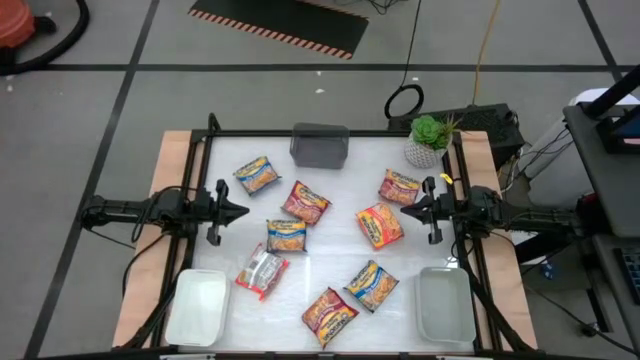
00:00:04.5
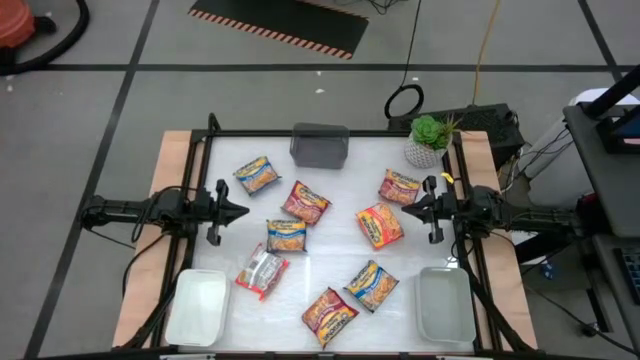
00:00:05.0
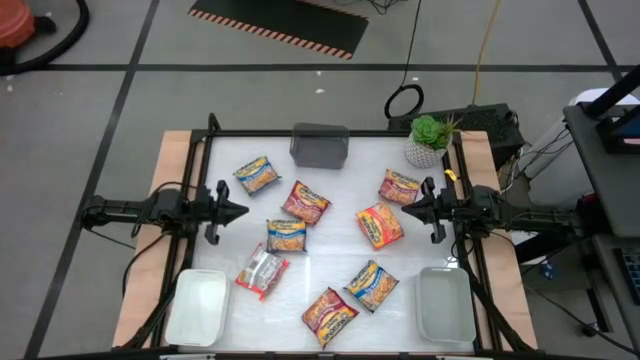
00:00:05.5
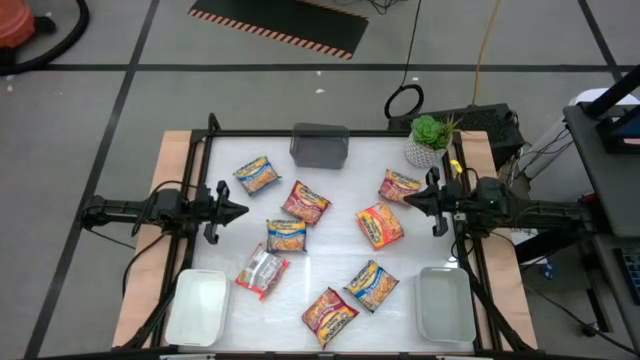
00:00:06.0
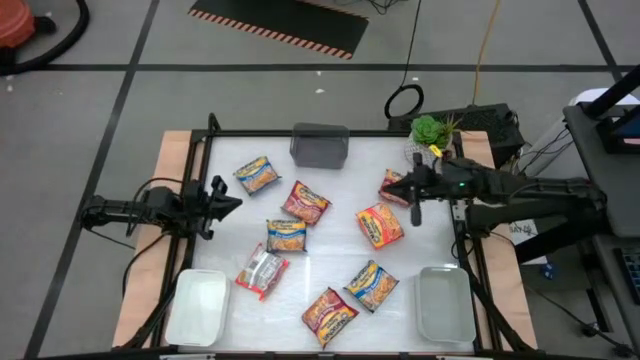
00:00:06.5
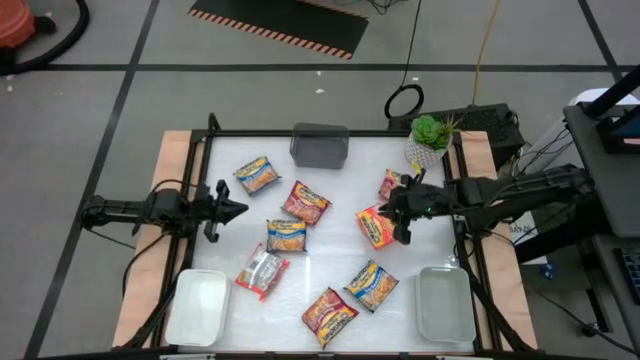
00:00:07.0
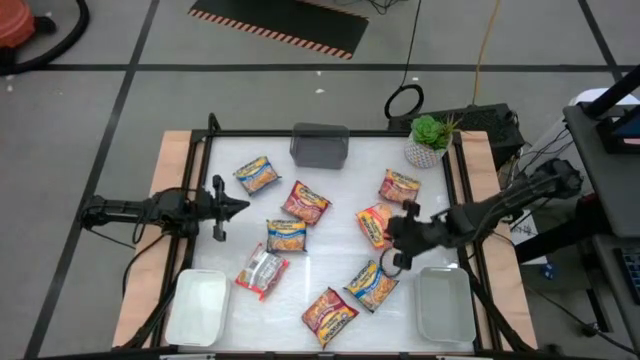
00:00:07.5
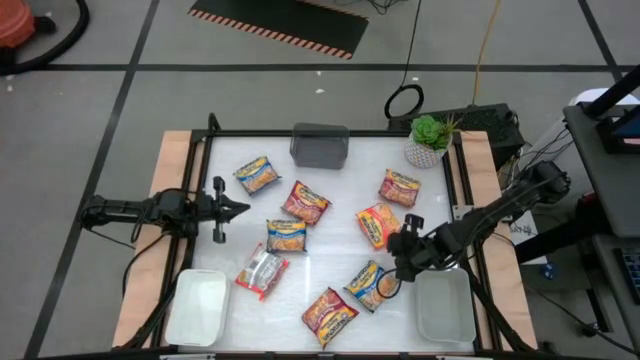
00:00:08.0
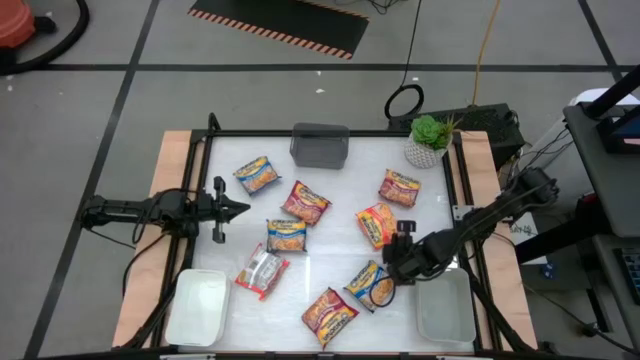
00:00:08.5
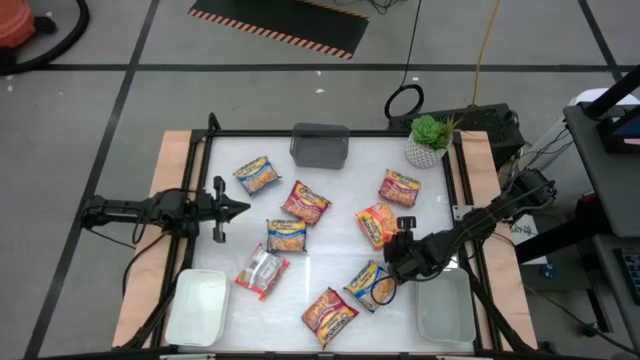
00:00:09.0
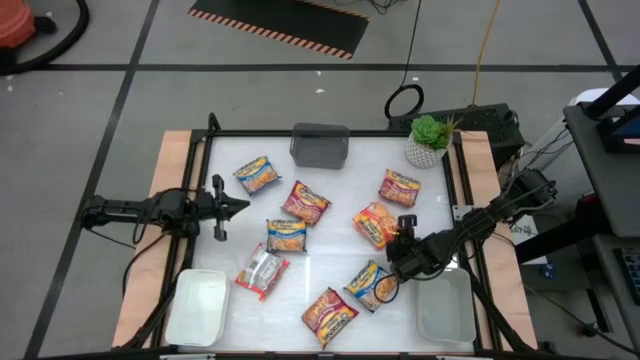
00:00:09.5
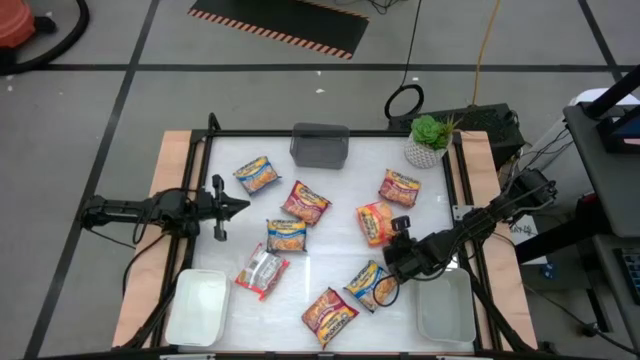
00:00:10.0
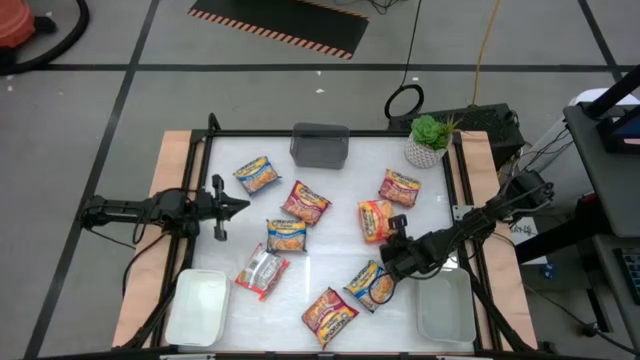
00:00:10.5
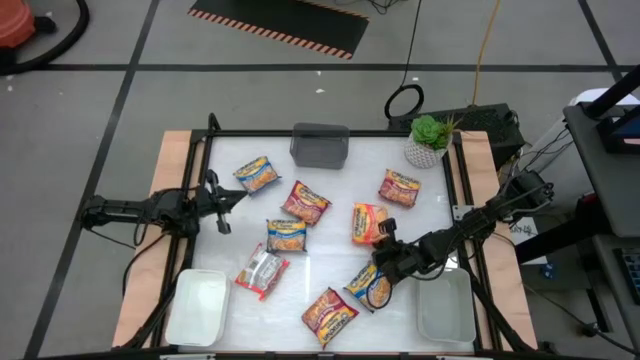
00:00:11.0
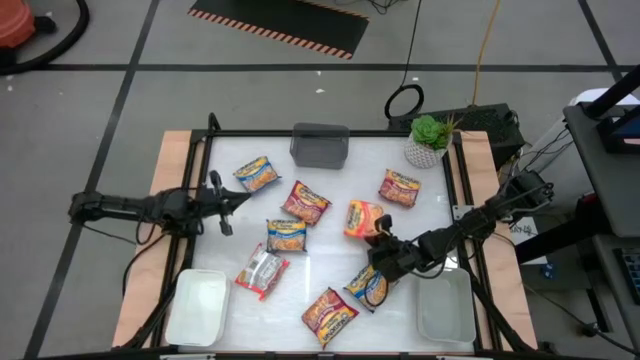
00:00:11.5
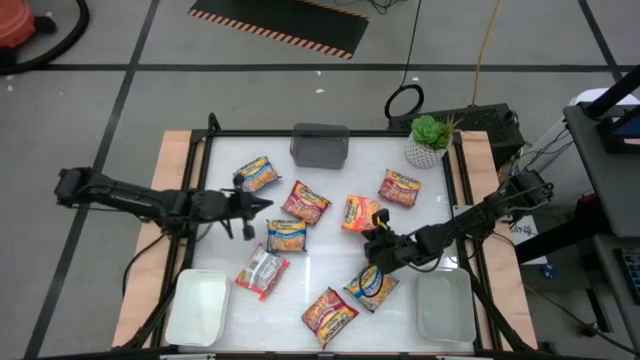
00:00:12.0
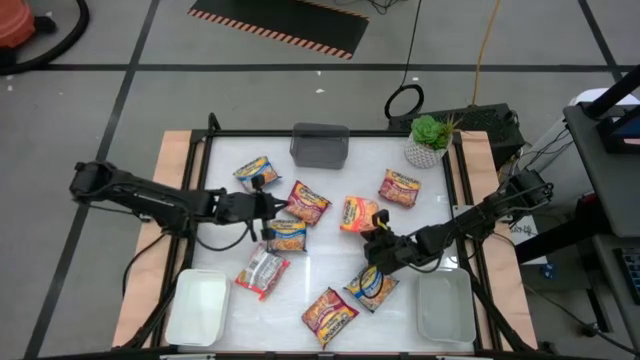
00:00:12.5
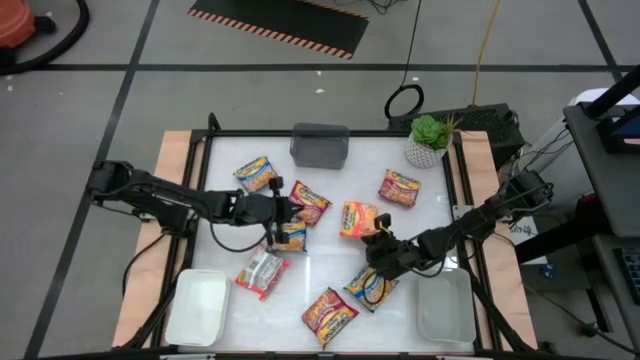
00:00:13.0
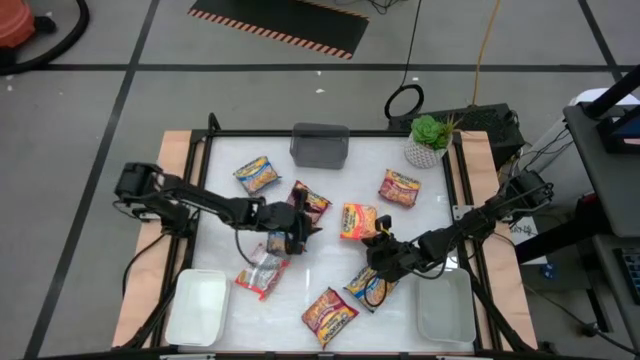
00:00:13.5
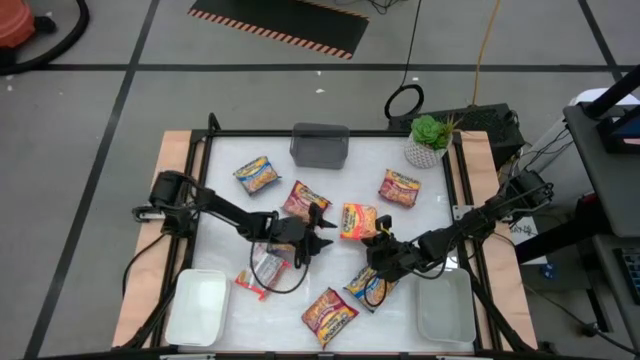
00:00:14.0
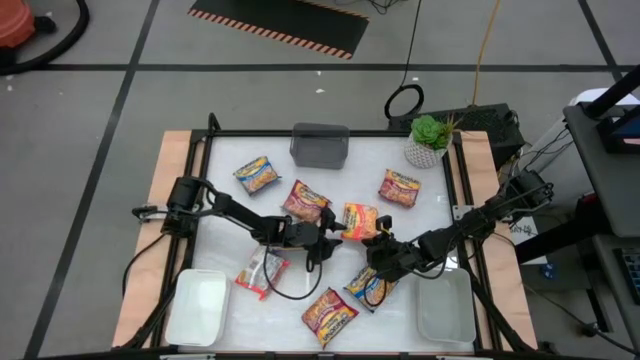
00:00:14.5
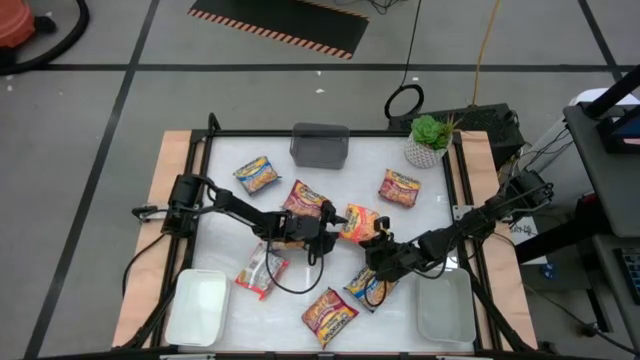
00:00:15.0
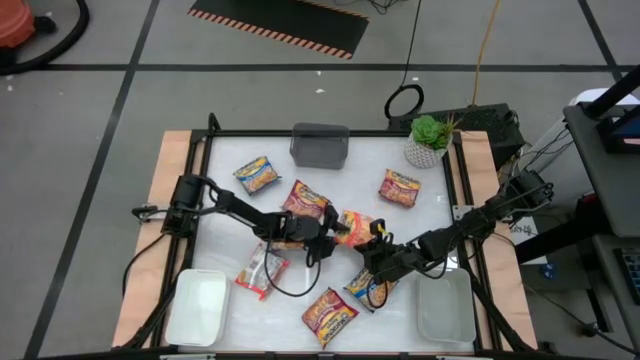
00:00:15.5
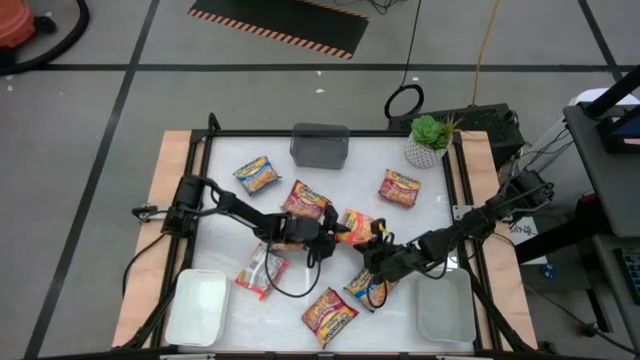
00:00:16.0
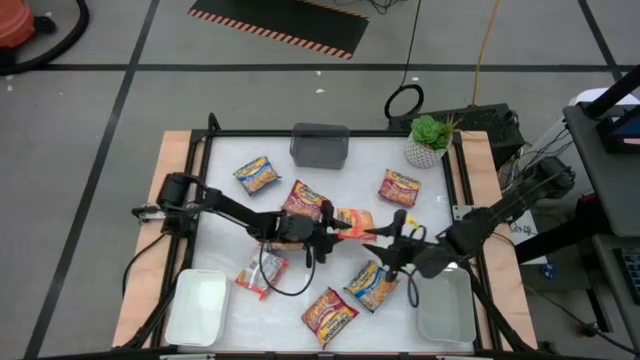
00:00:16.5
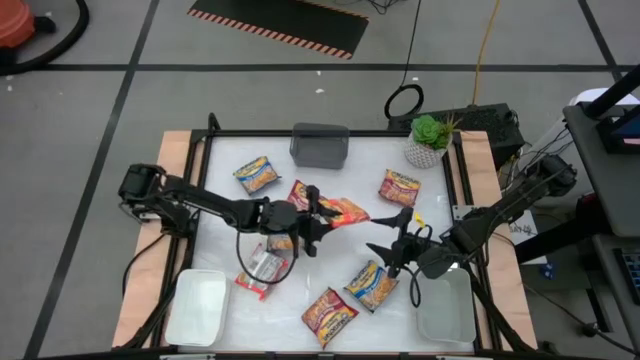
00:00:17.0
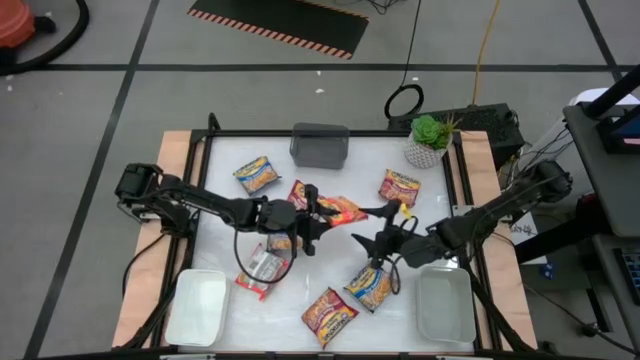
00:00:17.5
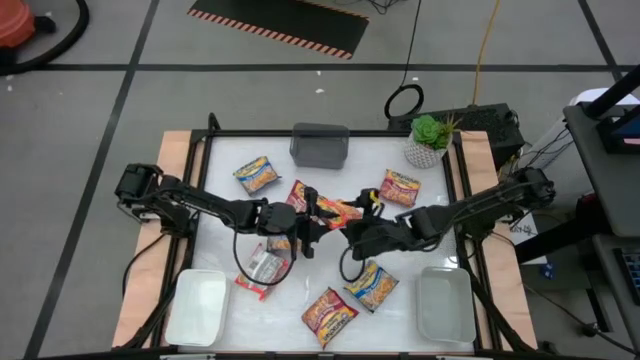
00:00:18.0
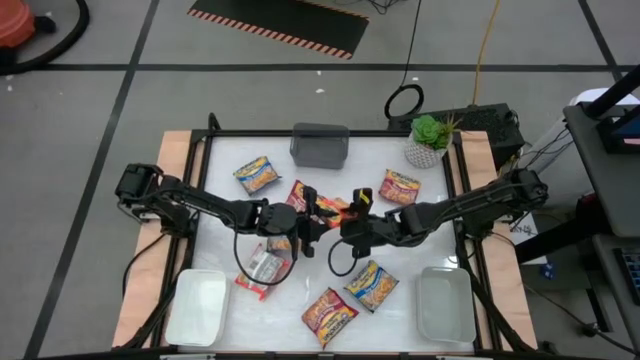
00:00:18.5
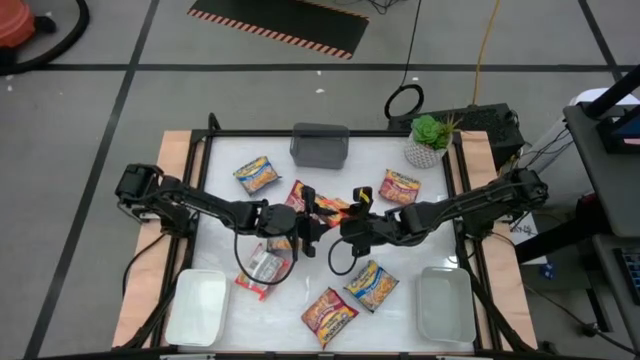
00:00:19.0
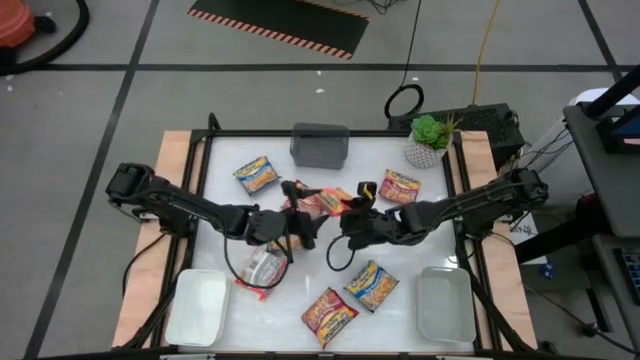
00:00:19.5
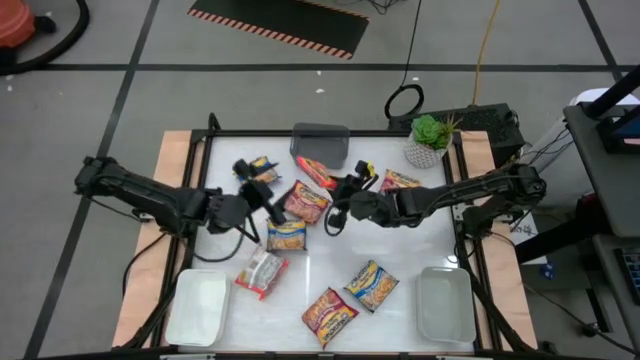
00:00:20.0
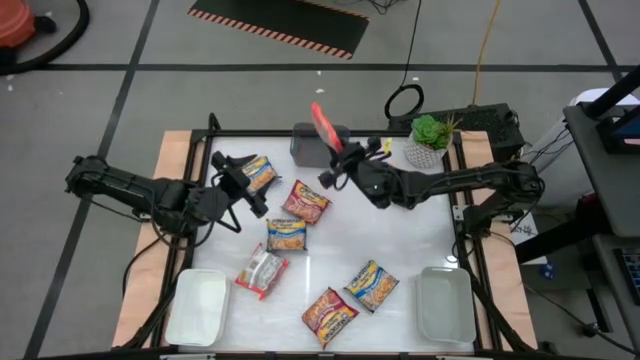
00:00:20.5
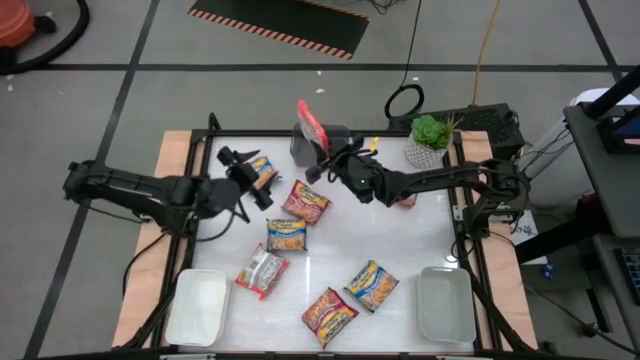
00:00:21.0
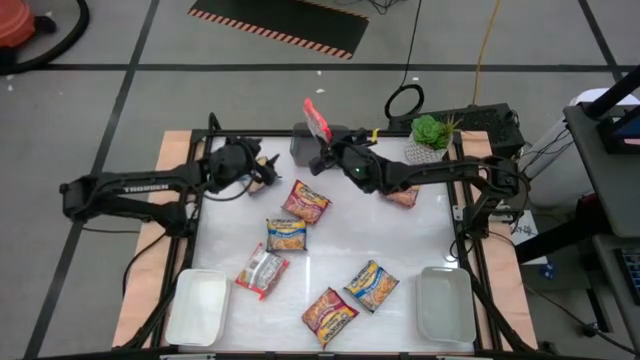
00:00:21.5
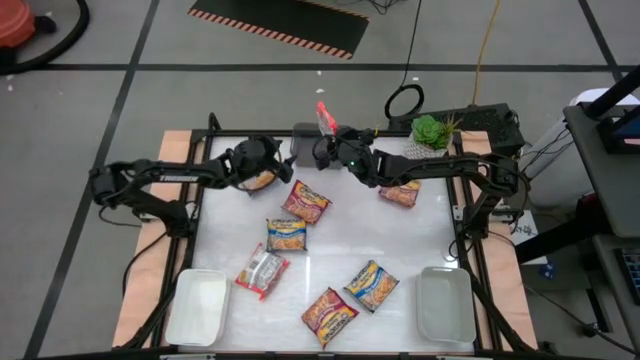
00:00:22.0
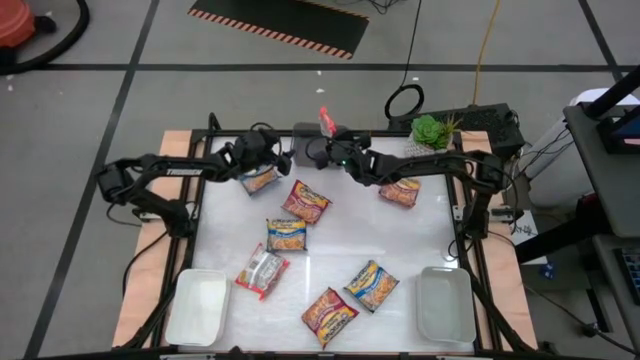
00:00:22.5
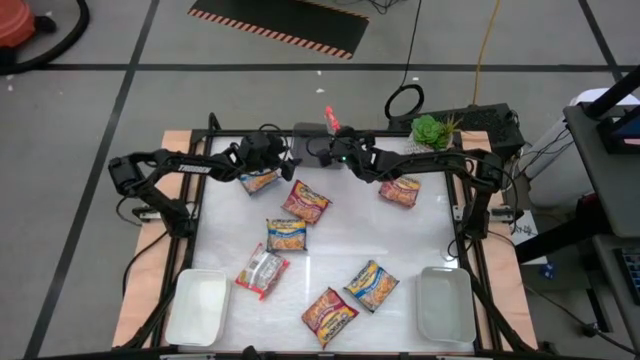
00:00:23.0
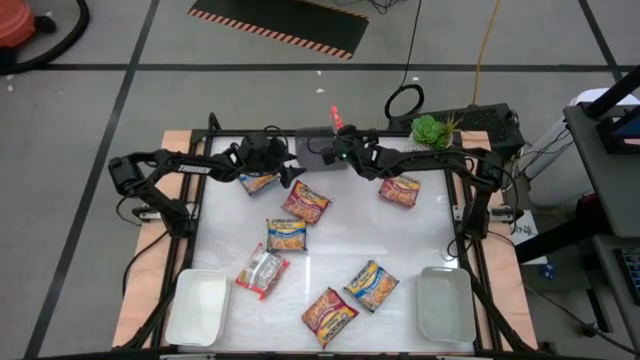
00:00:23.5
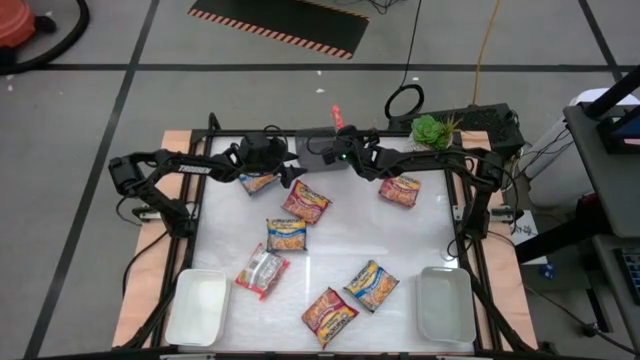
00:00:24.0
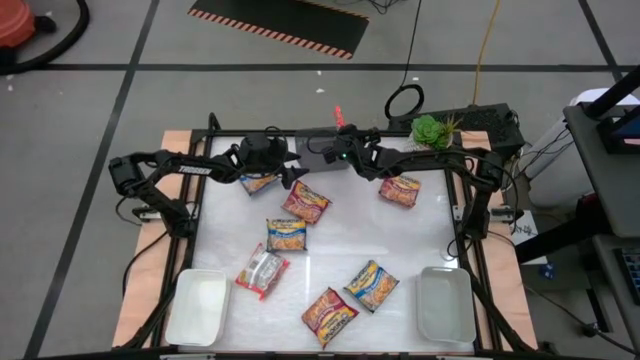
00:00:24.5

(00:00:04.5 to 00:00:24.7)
Task: Sort Maruchan noodles
Put the right orange noodle pack into the black bin
